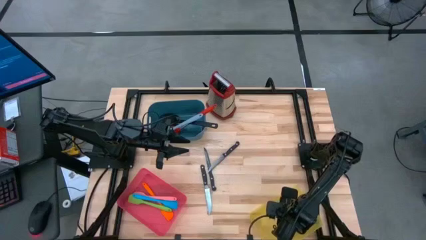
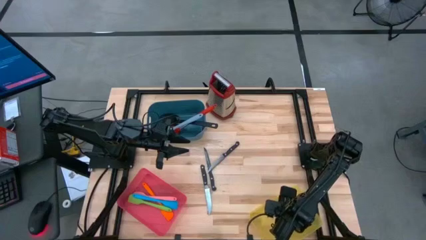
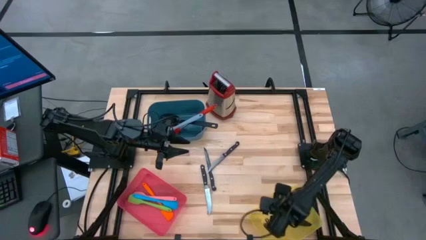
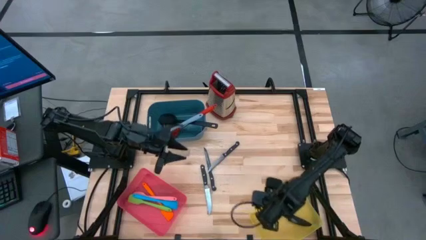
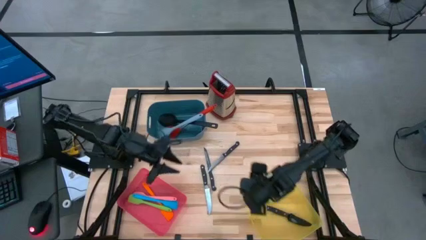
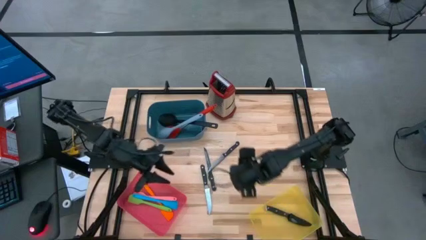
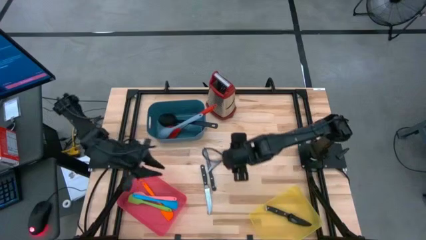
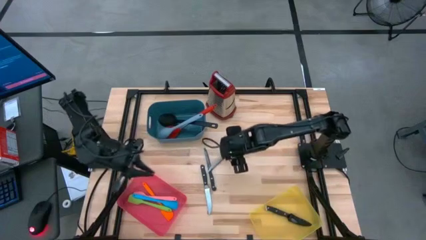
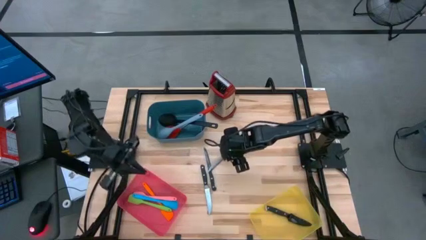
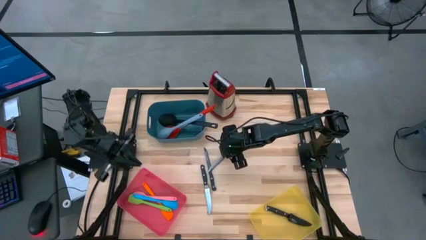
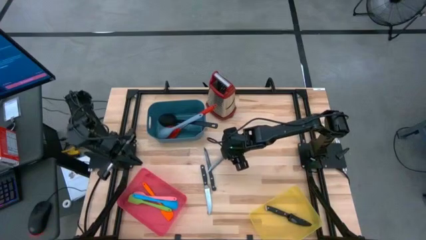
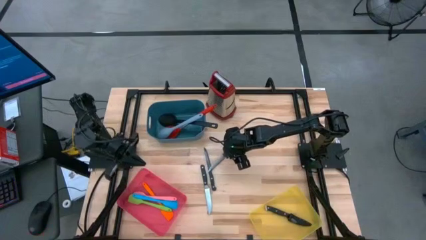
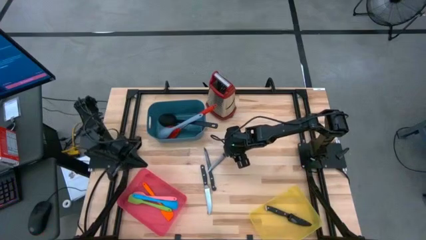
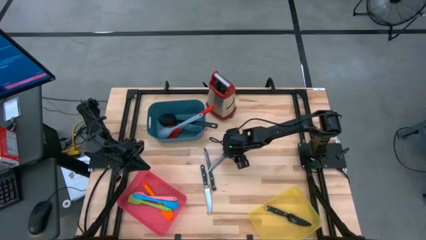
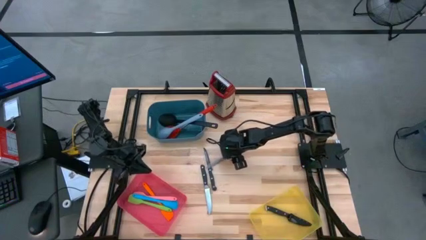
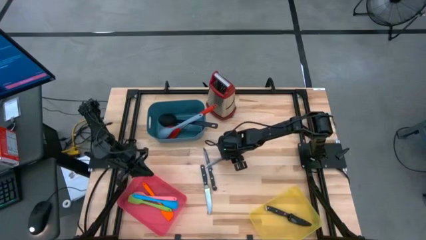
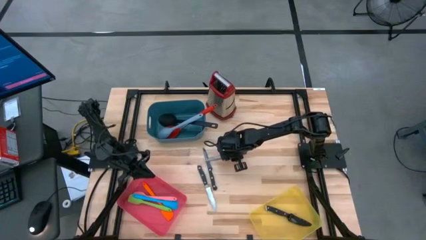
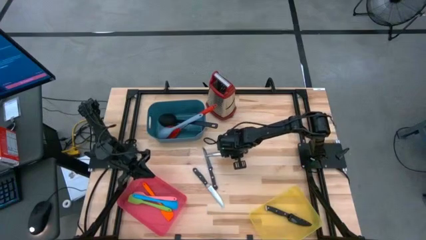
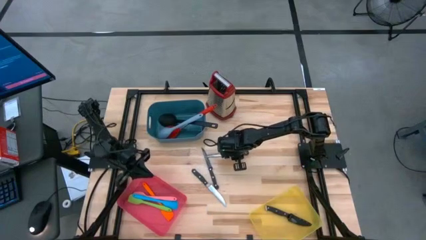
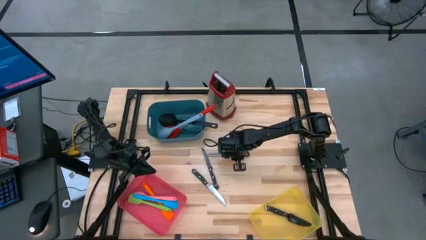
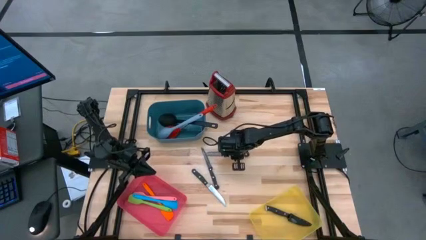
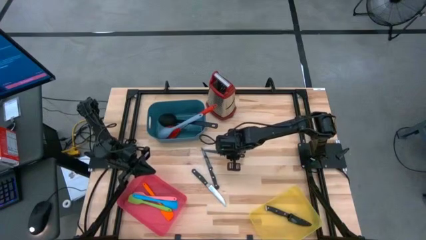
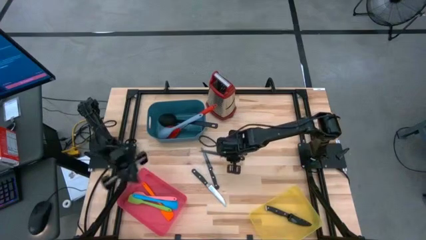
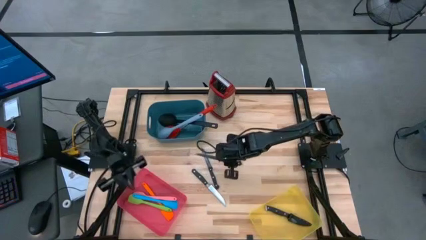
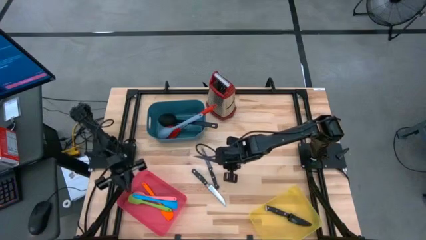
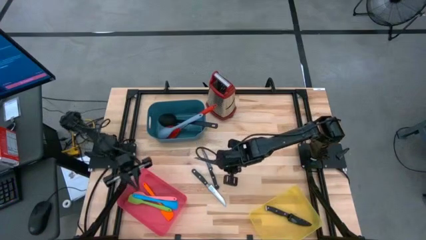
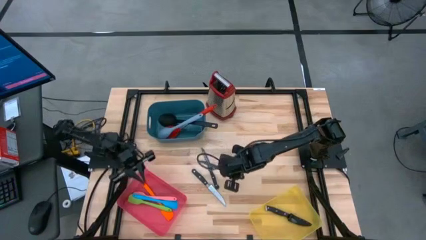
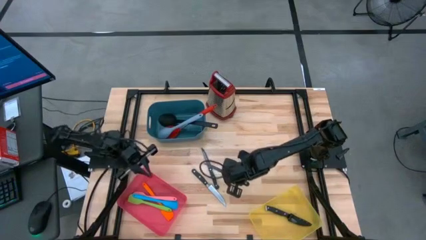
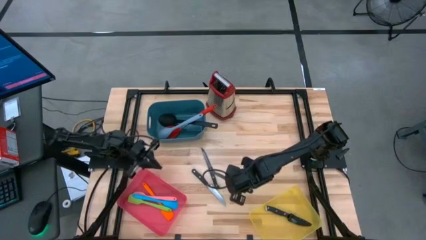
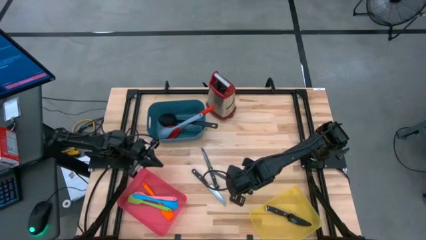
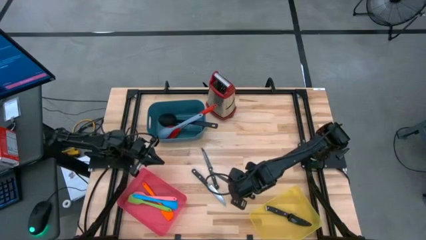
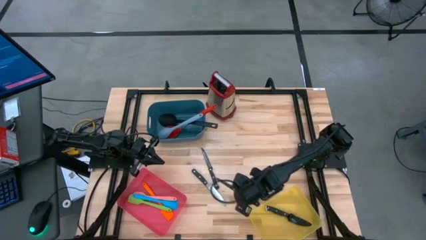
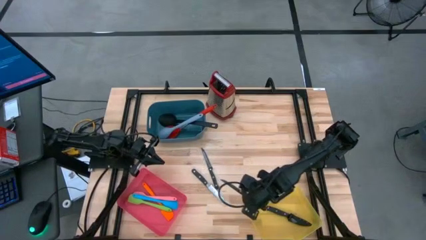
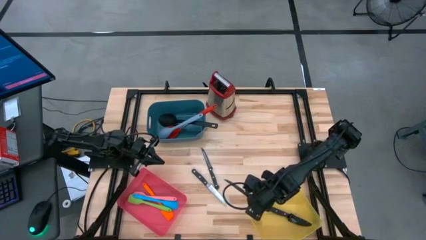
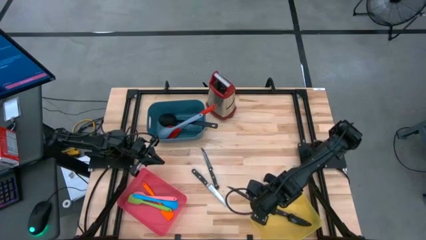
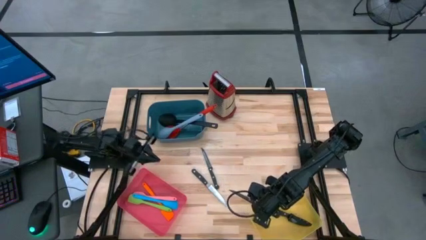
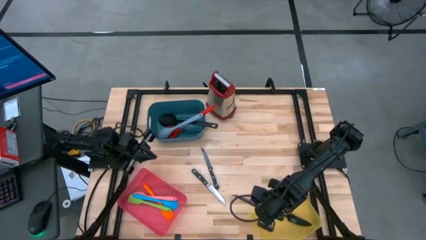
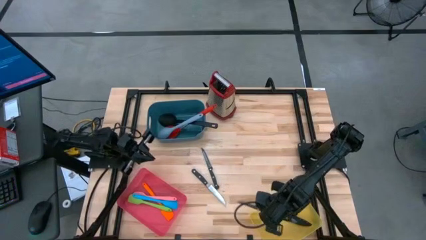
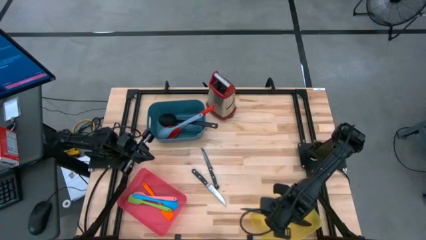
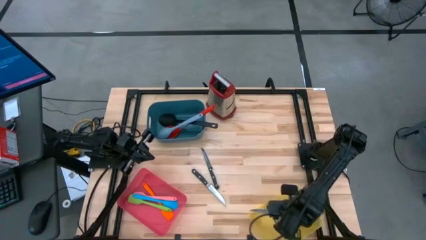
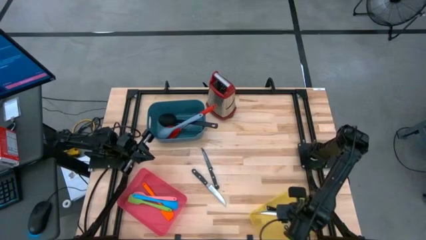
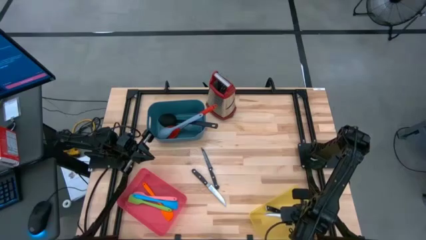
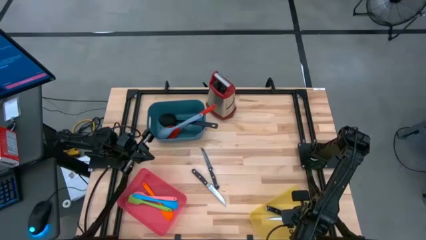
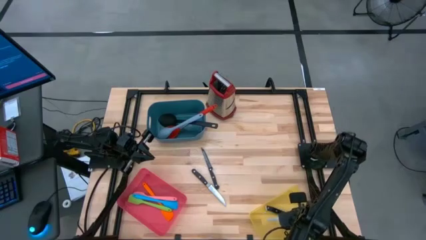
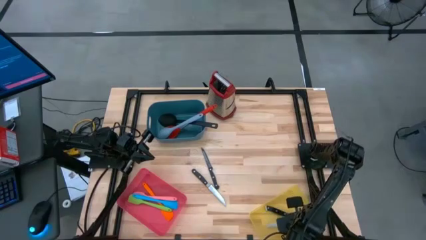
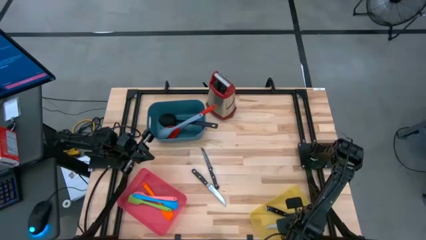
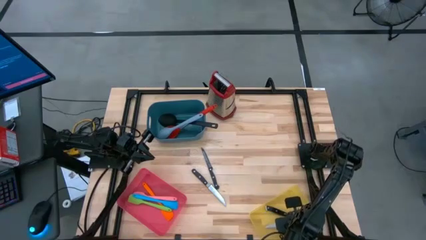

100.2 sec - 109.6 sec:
Task: Pick & Place Kitchen Items
Put the top right silver table knife into the yellow bin

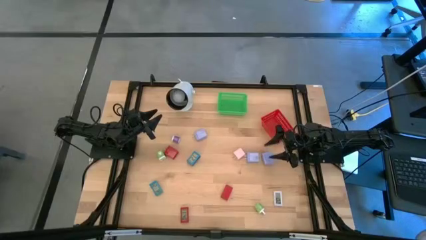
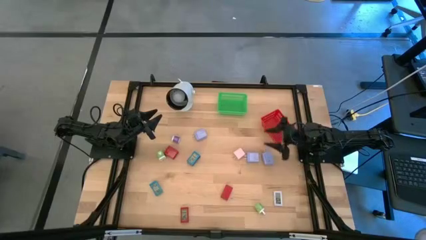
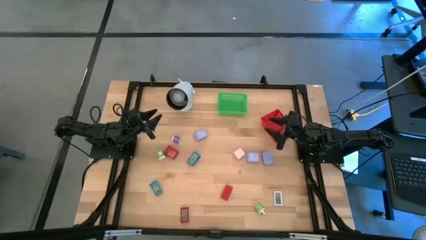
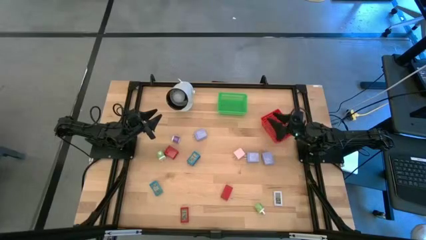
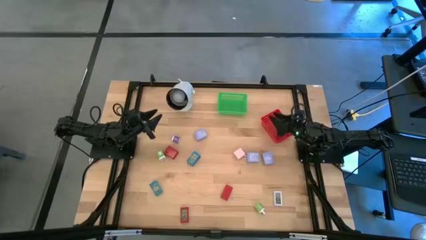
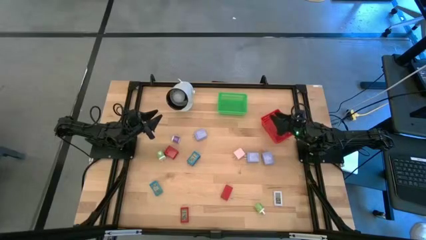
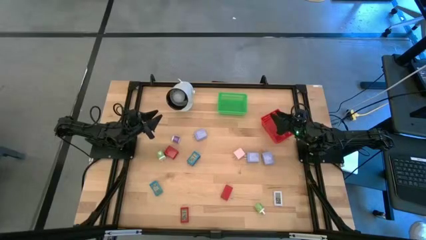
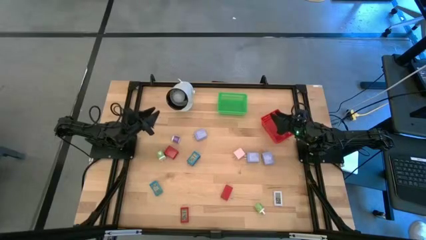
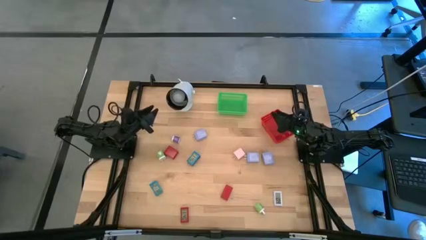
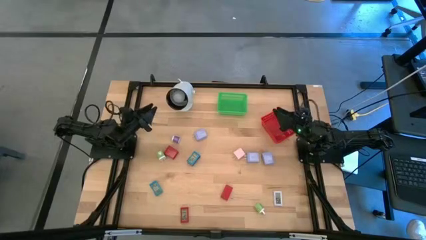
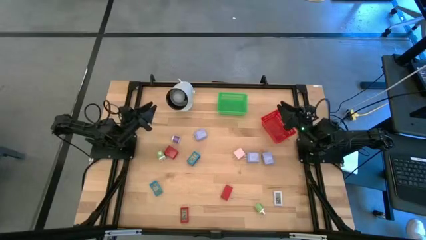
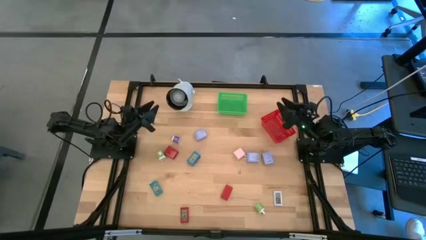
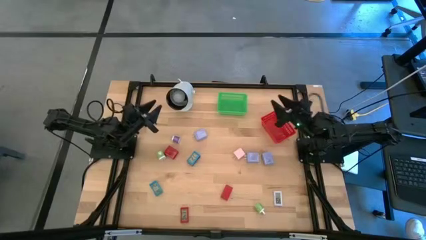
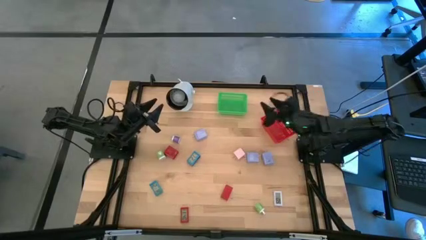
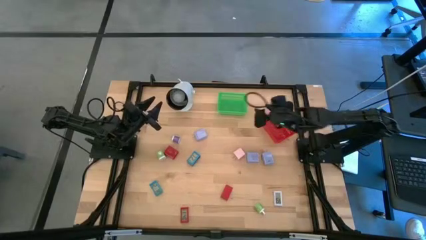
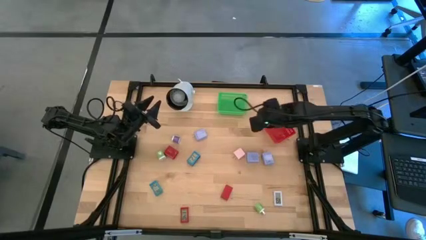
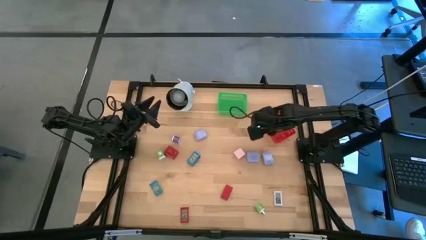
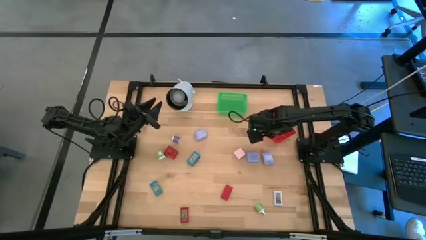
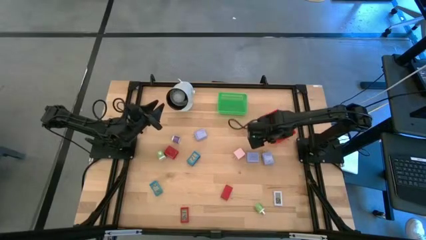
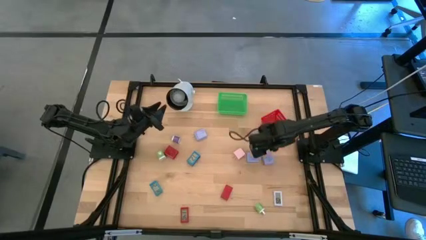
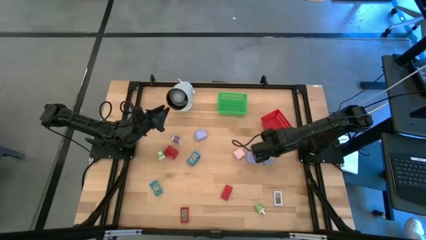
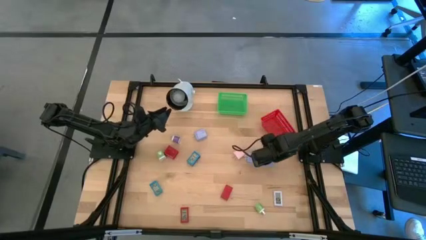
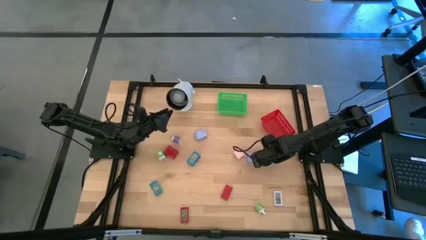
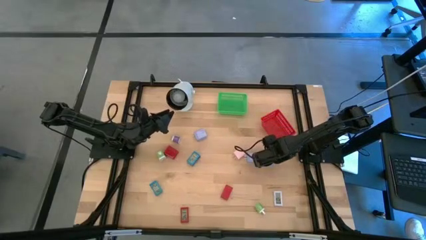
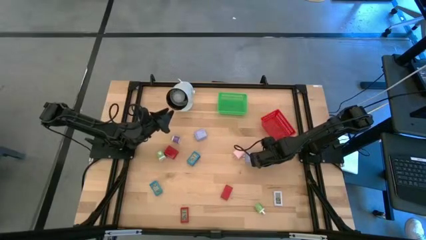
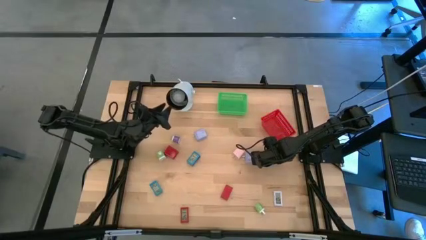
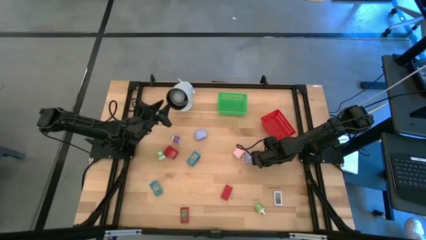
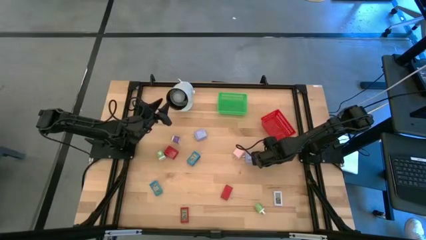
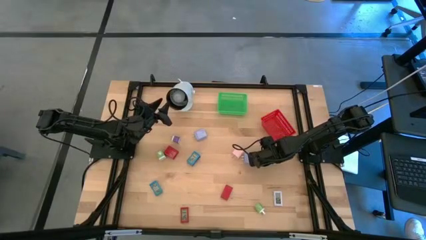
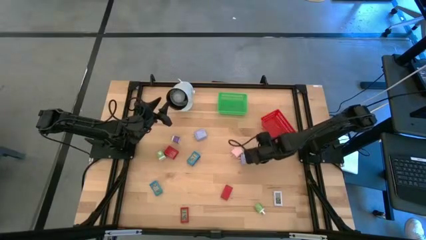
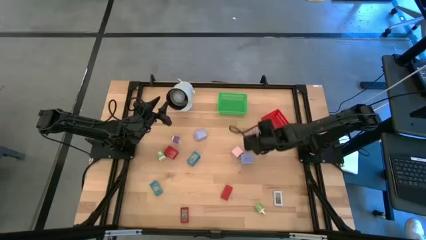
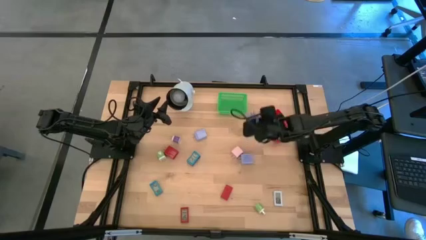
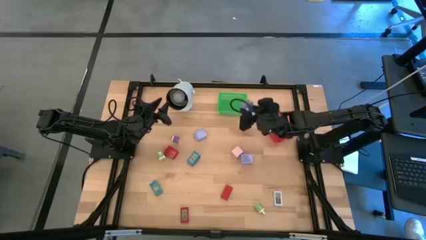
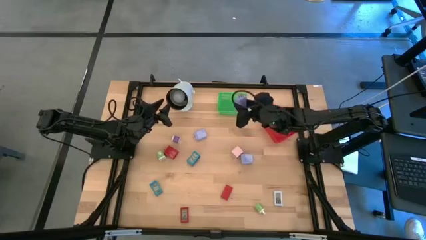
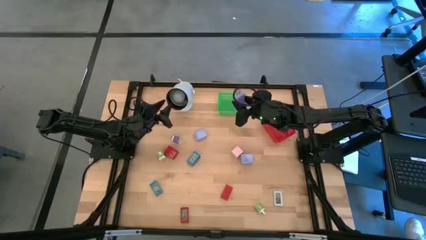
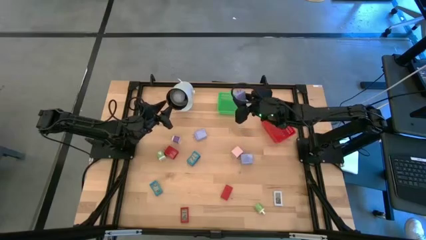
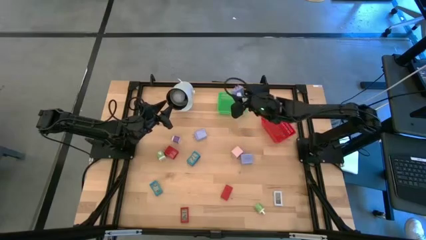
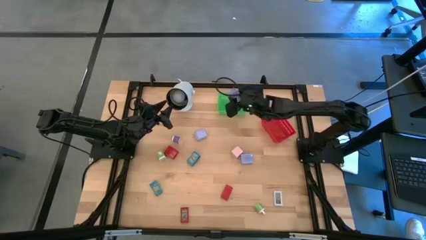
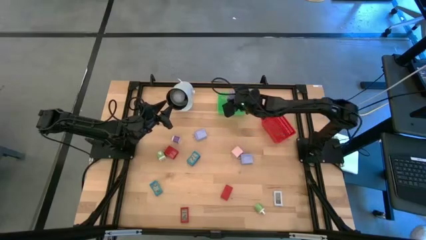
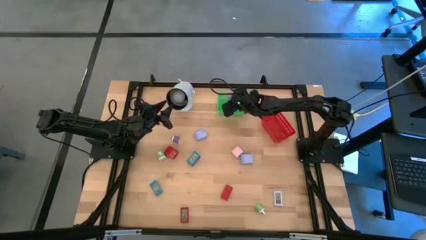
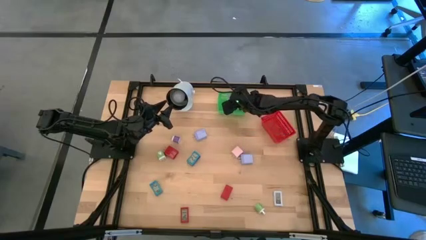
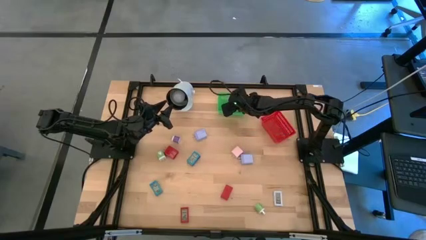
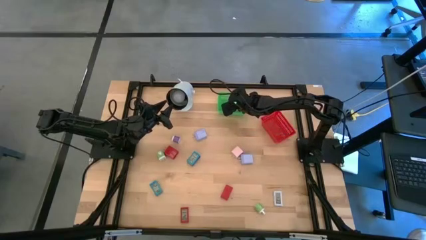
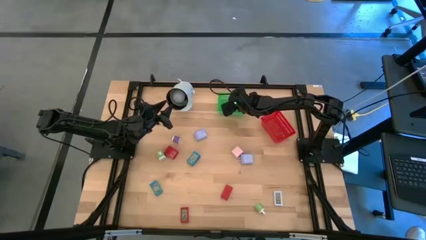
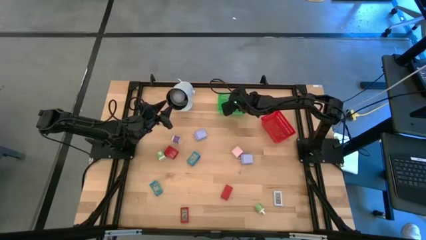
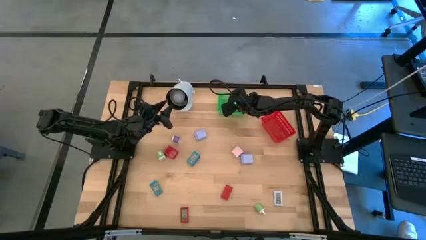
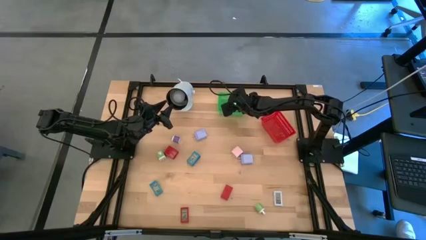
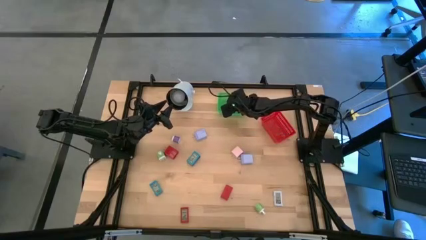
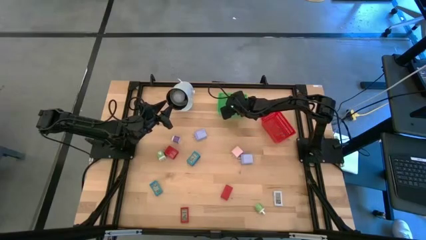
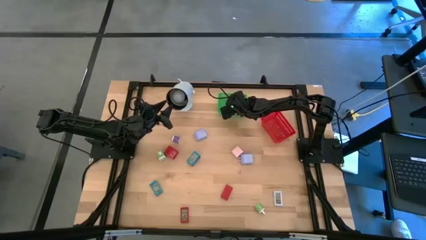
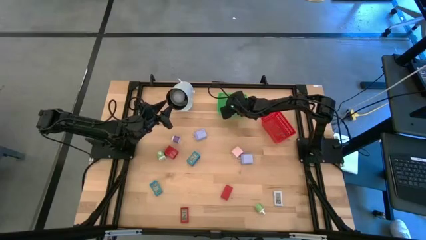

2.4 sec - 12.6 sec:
Task: Pick & Place Office items
Put the right light blue charger adapter into the green bin
